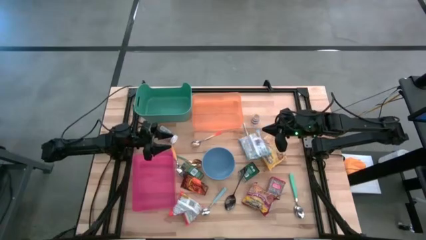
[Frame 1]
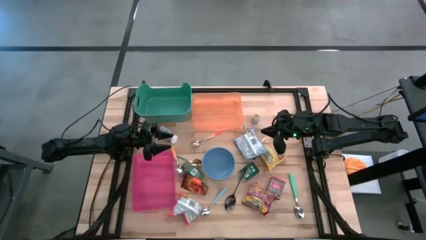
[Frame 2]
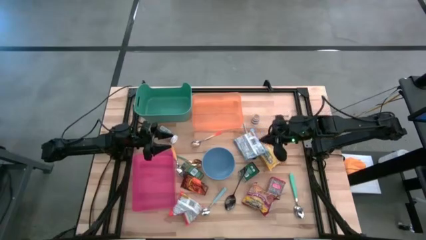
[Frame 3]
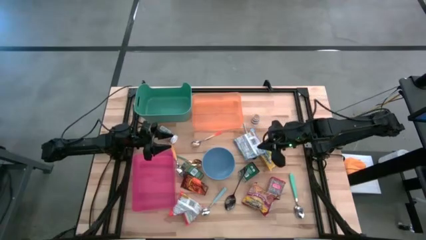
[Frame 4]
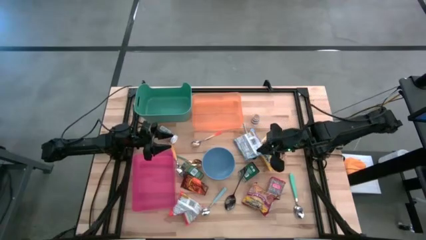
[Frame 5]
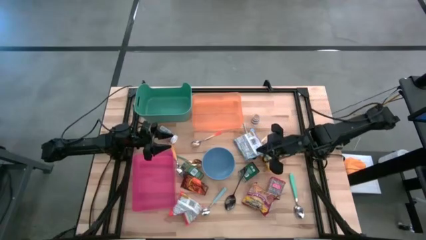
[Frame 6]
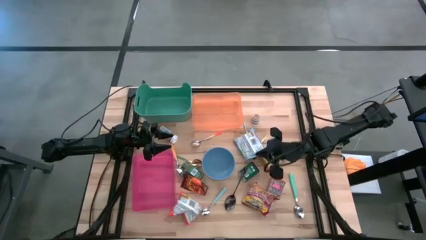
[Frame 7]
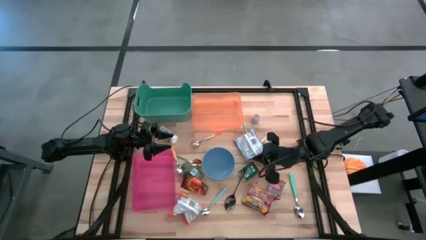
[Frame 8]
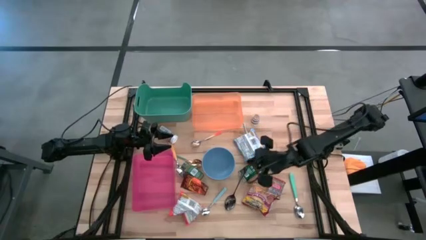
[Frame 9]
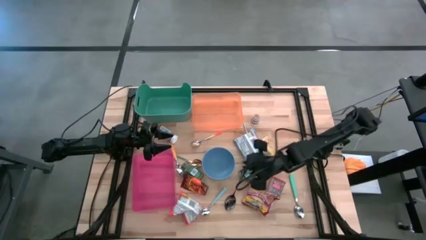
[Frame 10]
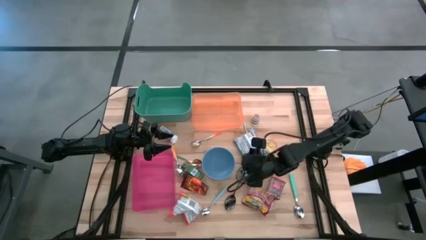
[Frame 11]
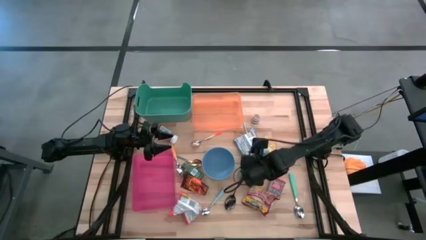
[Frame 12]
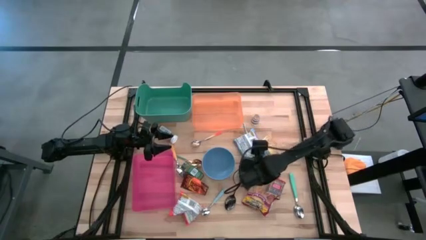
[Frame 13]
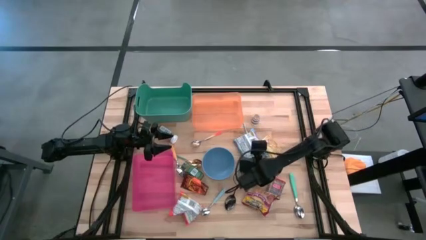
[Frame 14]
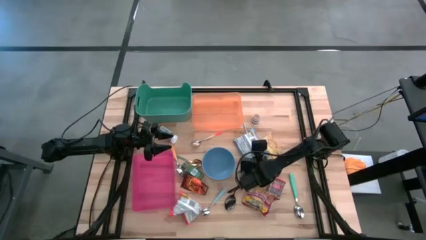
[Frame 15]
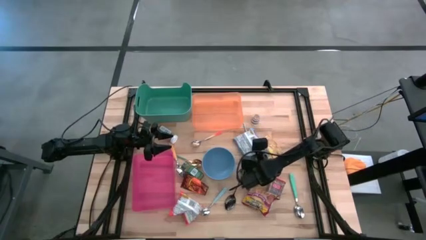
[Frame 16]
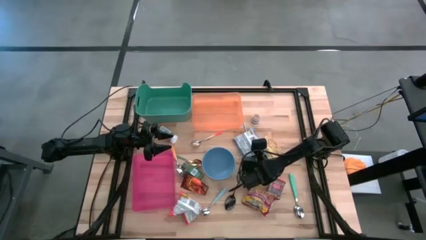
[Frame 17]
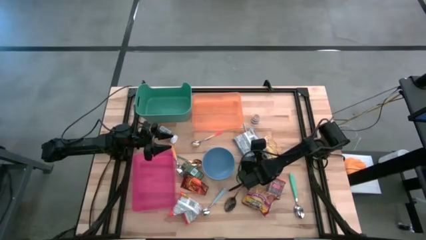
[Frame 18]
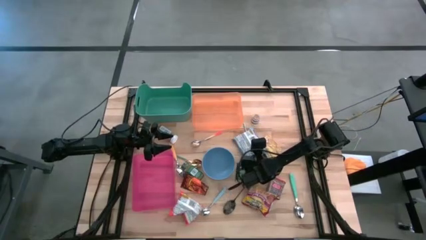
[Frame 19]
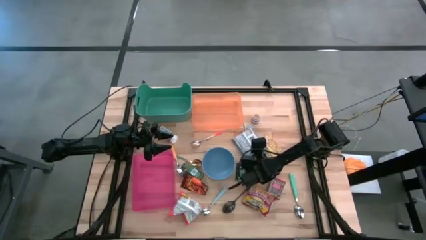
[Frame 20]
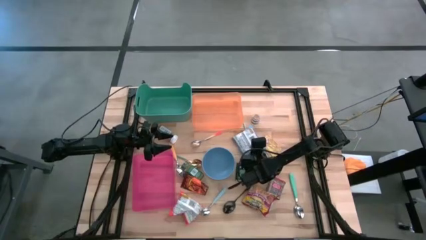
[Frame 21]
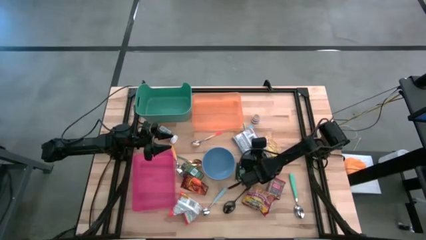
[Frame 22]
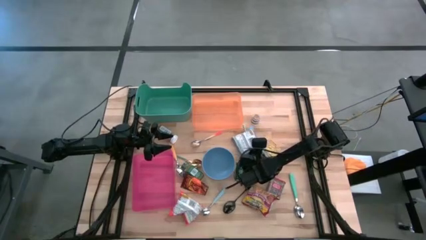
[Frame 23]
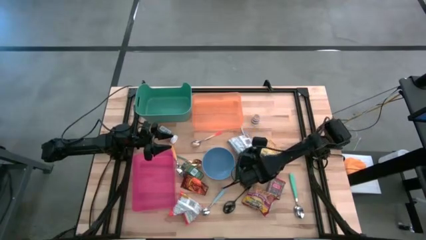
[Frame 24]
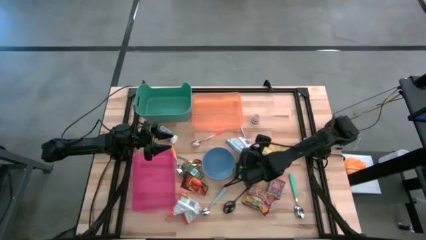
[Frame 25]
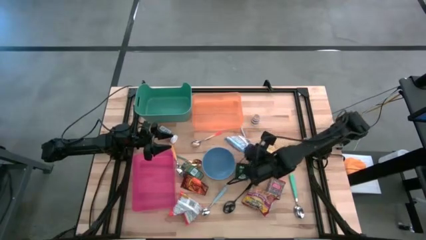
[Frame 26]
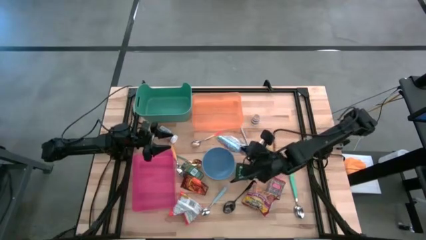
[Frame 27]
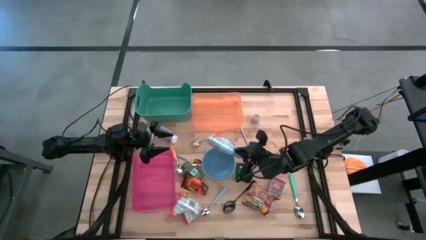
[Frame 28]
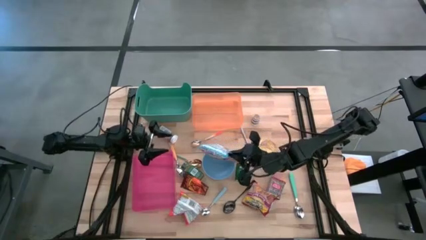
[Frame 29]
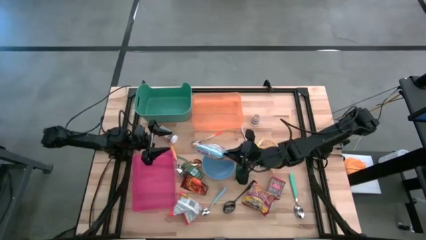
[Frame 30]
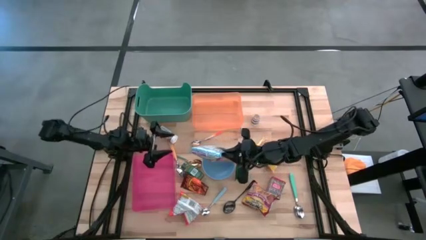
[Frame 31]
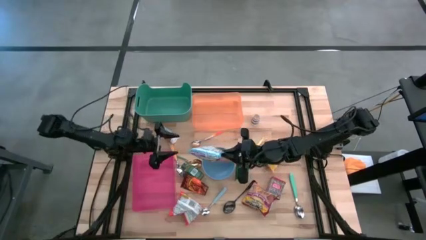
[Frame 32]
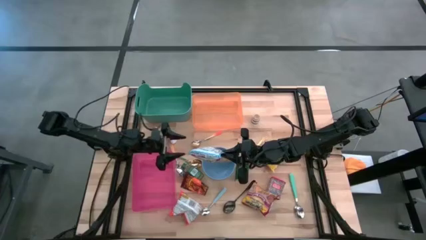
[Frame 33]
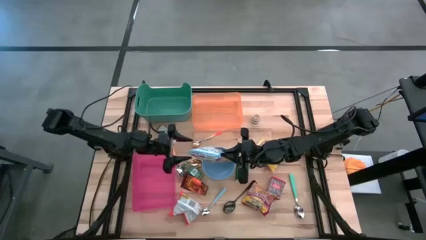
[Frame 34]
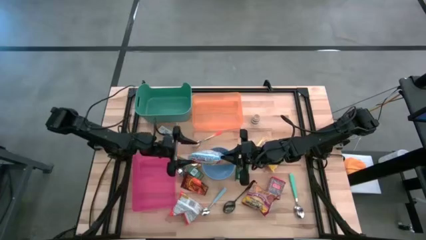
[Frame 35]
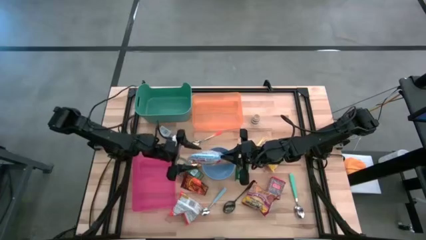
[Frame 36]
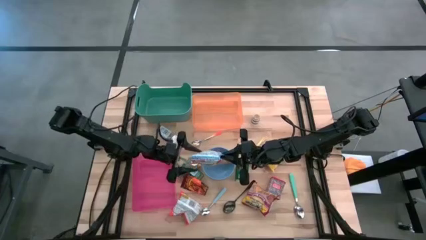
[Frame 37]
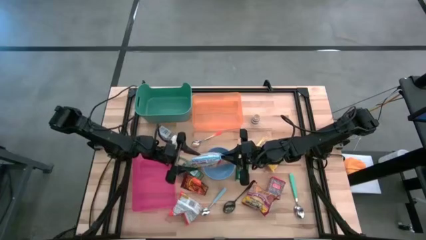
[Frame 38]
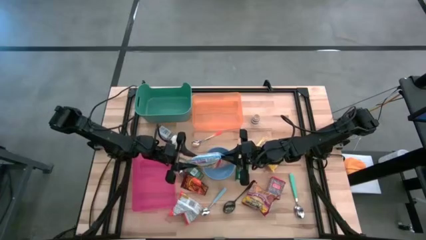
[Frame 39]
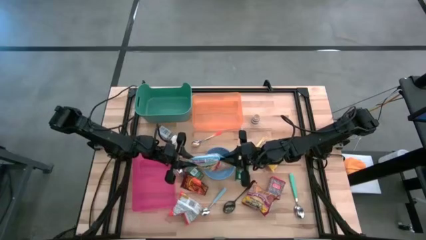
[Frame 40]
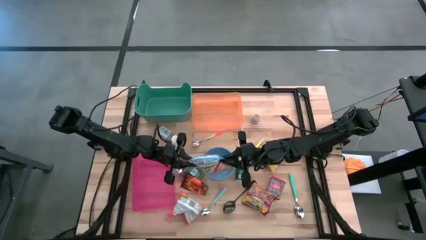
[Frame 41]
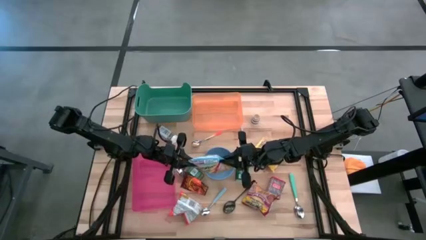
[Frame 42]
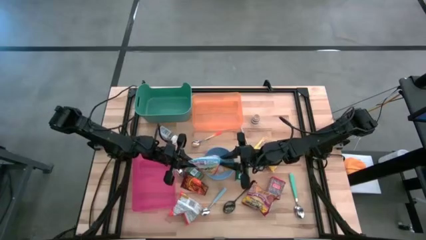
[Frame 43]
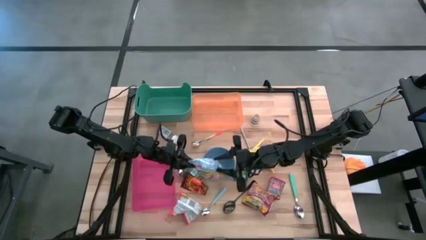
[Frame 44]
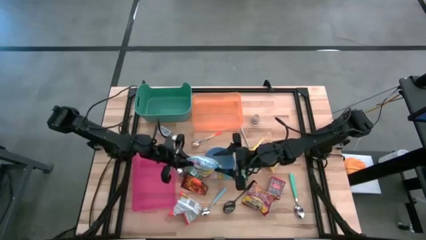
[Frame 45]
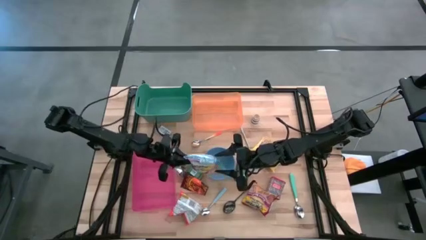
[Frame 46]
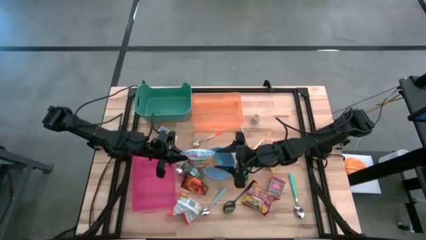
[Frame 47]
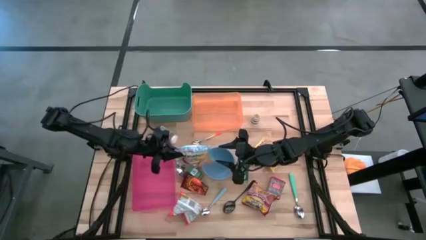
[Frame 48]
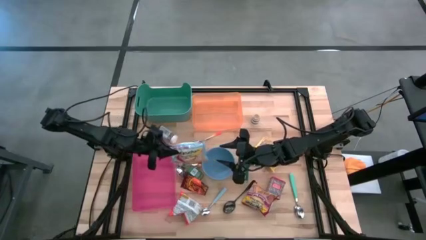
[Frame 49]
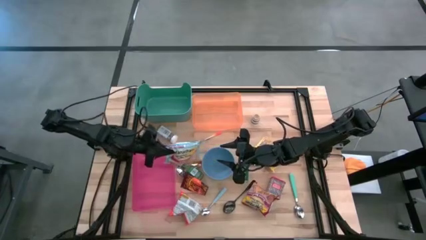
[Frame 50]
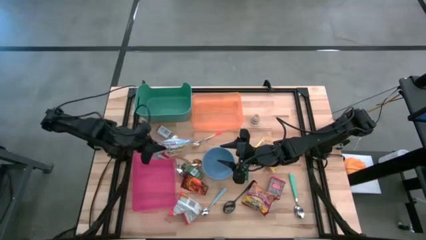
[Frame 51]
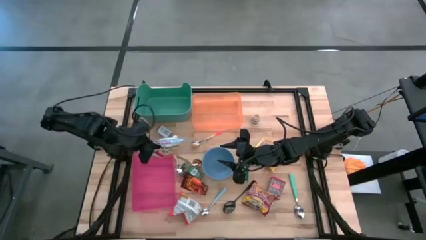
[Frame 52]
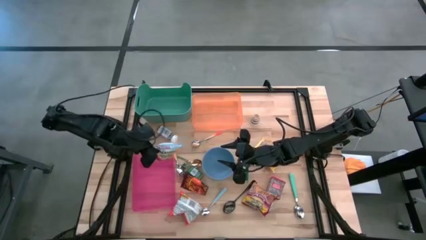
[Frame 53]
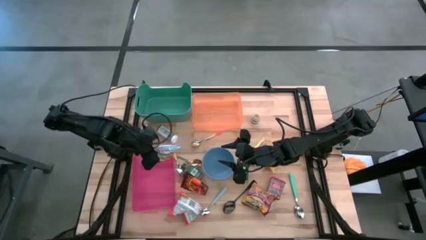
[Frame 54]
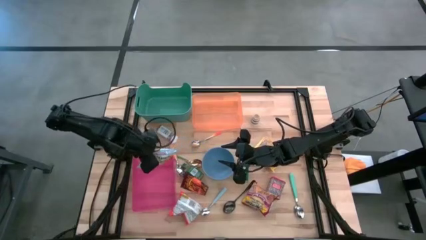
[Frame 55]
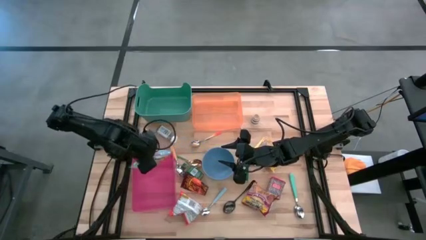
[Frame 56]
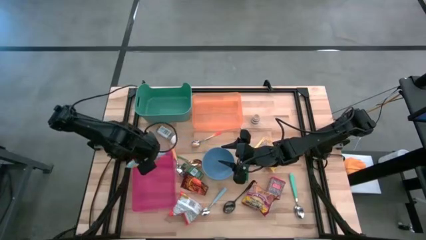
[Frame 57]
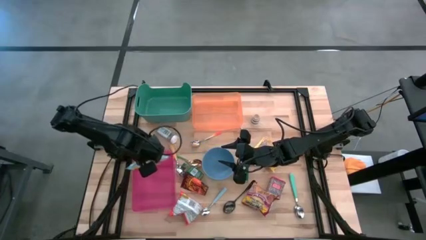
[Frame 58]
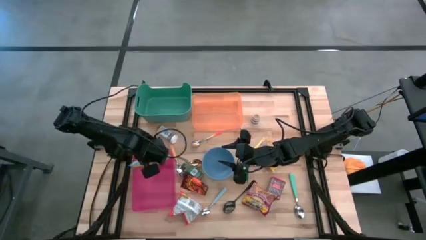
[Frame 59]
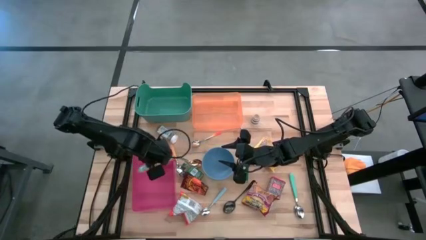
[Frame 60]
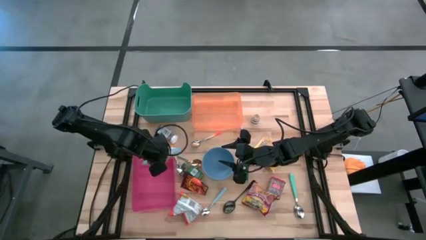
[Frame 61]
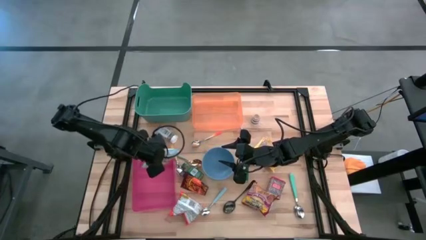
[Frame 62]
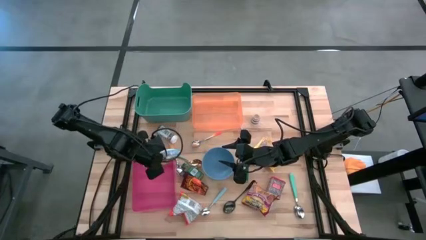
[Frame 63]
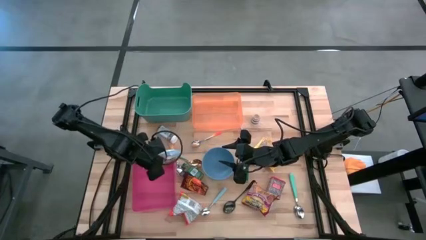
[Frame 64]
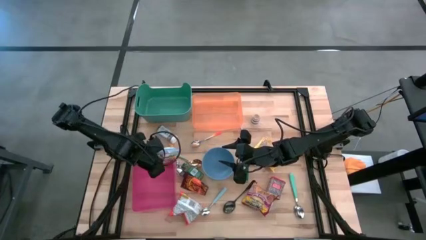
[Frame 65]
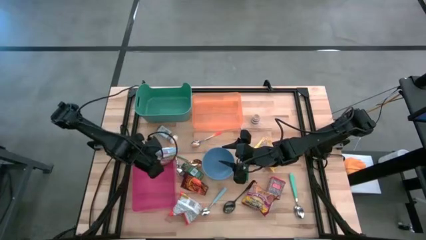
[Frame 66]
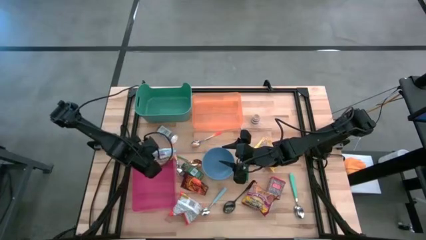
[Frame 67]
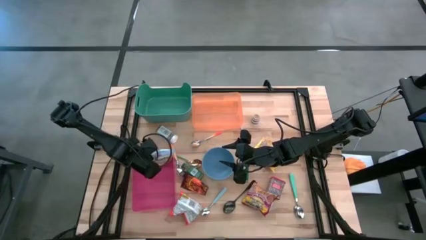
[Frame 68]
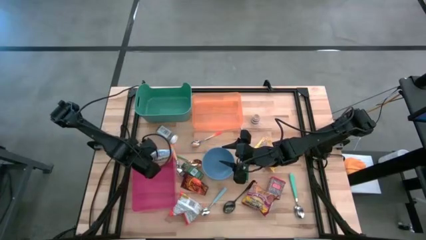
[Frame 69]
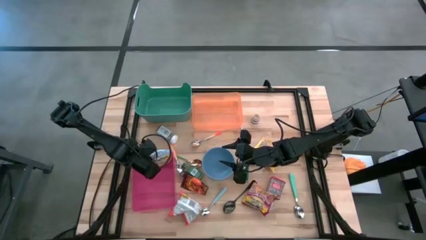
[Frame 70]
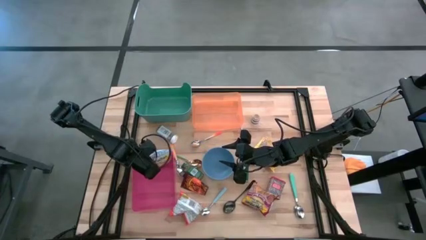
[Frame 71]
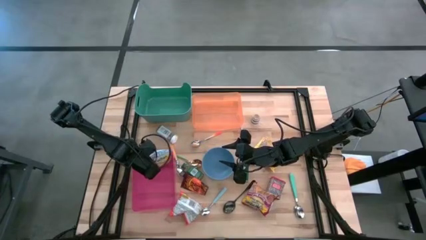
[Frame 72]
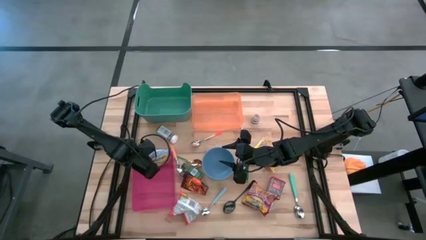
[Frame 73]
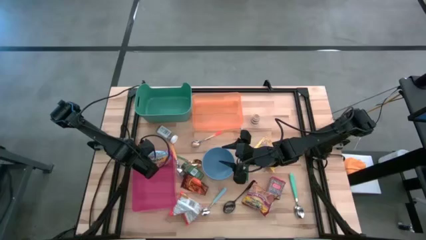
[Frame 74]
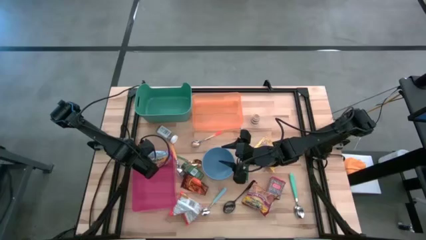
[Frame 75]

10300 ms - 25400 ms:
Put the blue noodle pack into the pink bin

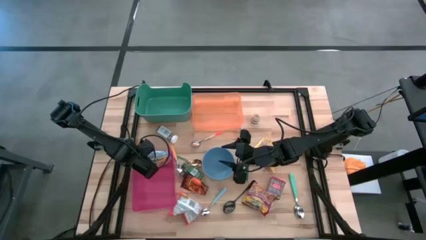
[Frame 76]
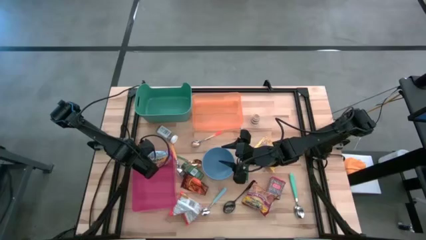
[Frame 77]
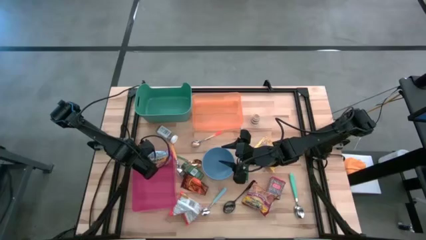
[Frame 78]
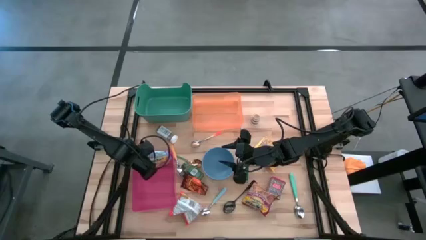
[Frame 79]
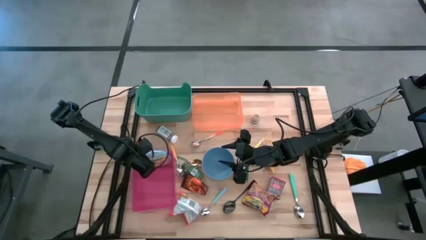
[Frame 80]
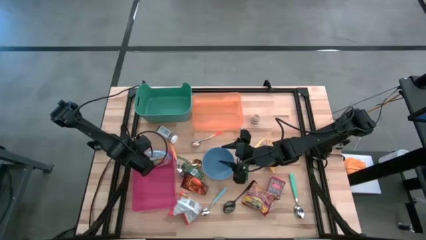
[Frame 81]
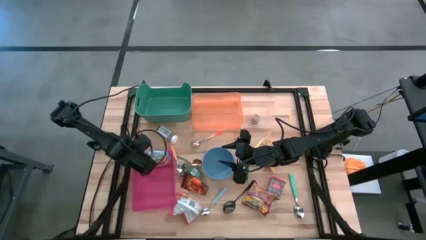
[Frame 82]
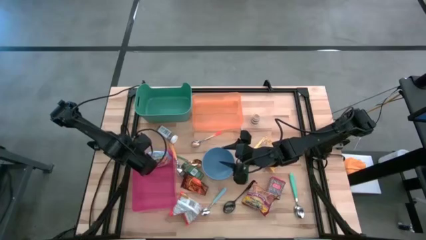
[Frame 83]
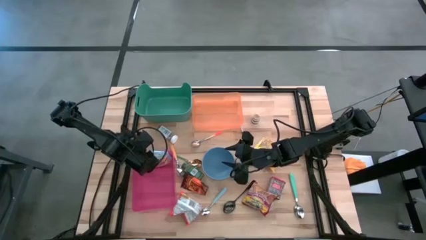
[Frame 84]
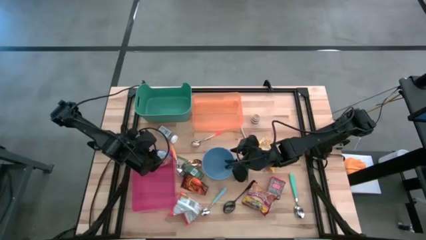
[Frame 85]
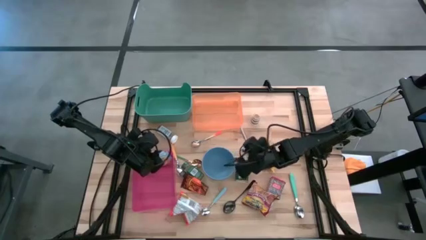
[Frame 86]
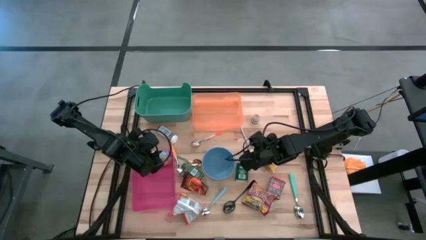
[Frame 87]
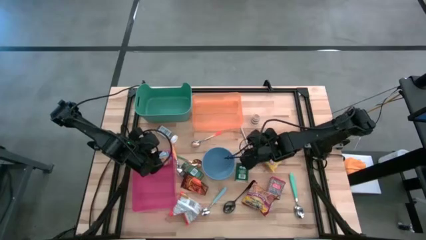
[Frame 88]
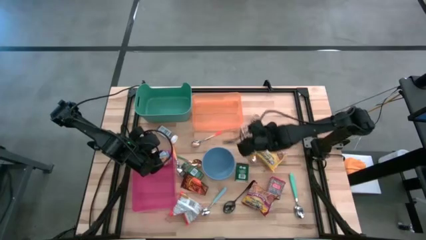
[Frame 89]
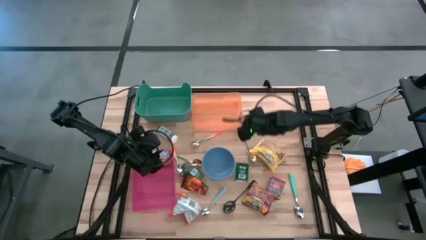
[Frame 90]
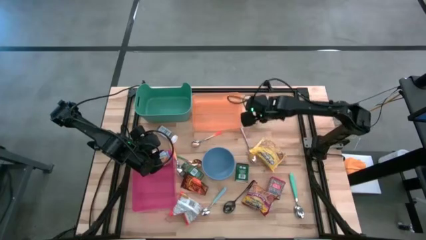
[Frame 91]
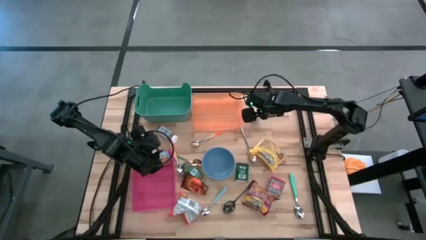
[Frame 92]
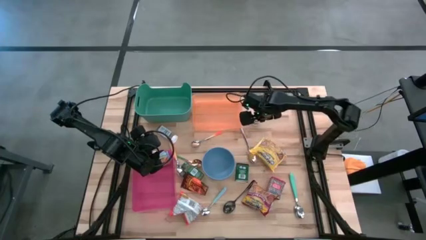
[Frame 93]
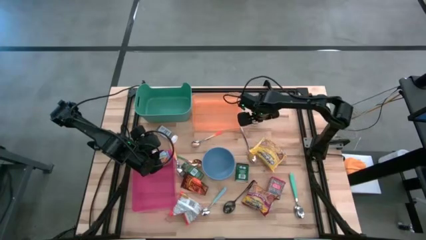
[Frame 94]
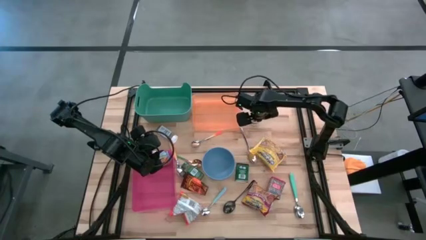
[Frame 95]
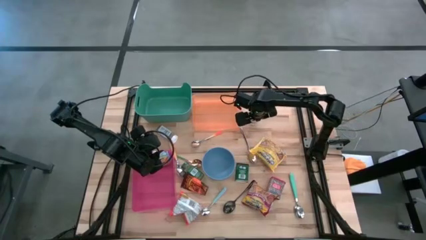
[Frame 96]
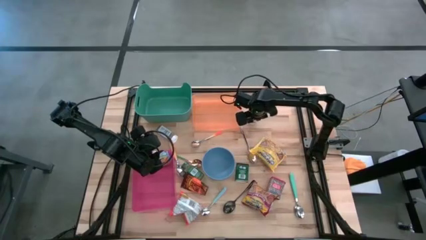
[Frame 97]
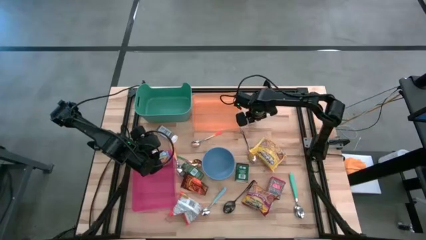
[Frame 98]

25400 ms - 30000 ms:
Put the brown spice bottle into the orange bin
